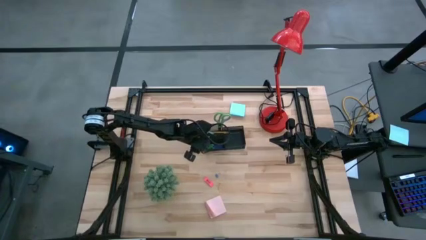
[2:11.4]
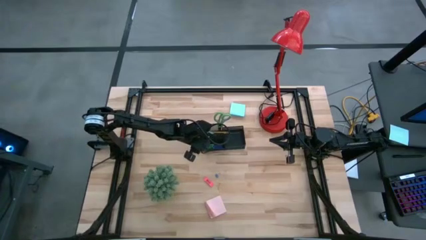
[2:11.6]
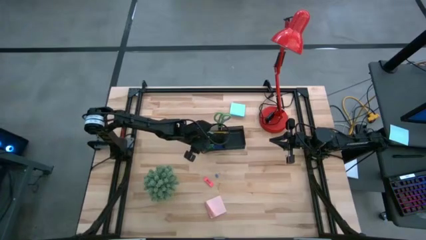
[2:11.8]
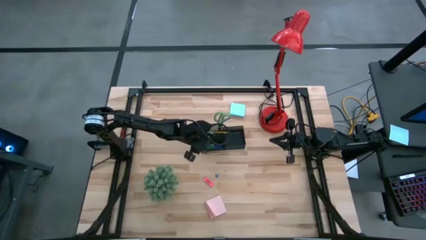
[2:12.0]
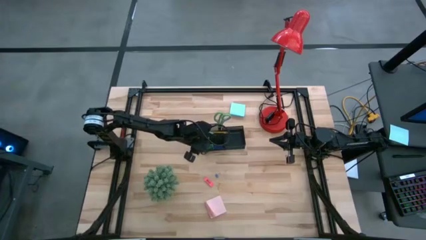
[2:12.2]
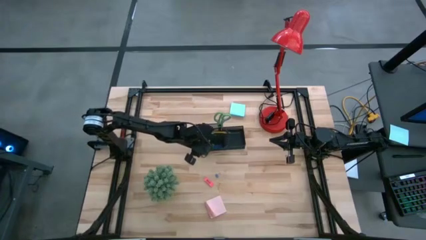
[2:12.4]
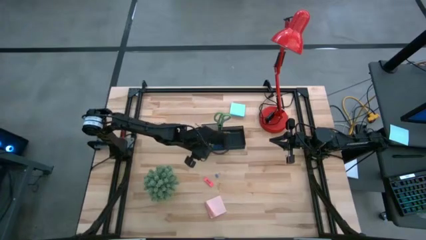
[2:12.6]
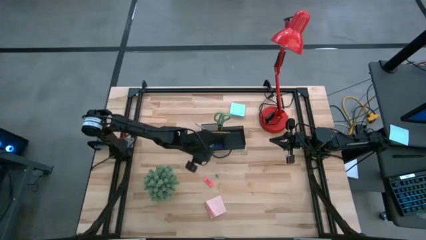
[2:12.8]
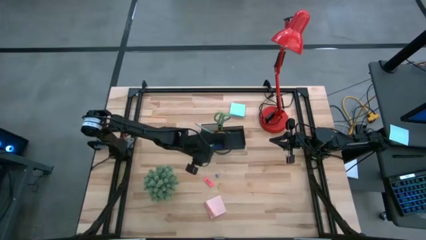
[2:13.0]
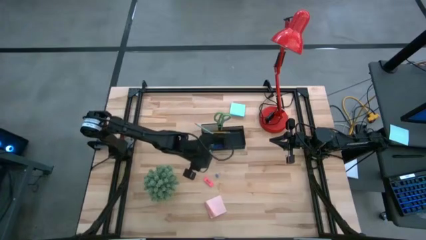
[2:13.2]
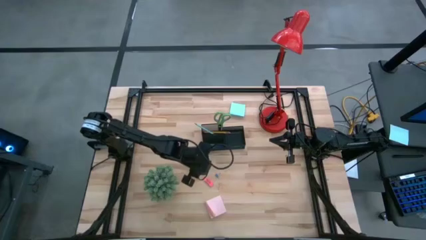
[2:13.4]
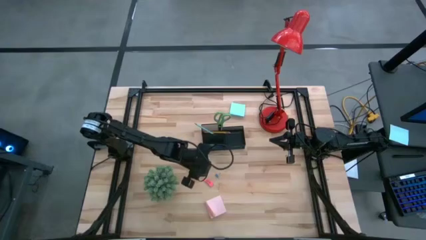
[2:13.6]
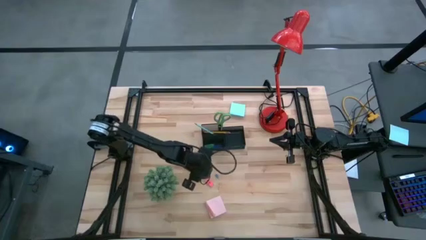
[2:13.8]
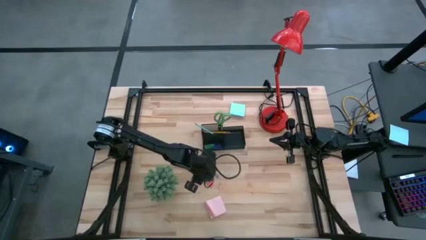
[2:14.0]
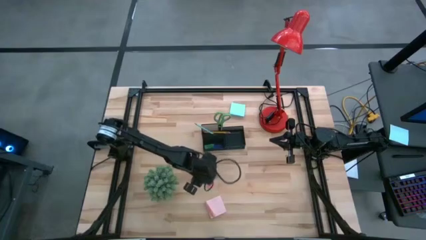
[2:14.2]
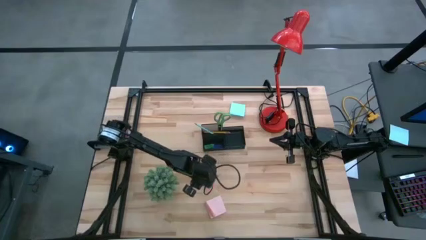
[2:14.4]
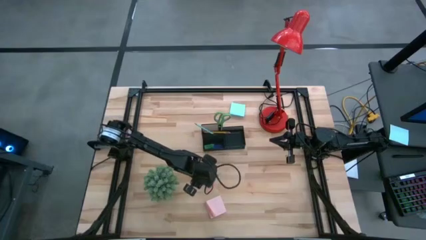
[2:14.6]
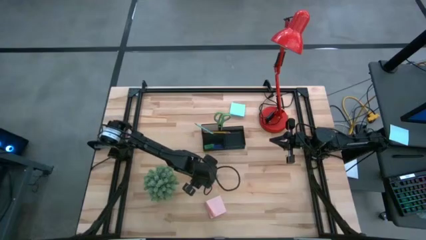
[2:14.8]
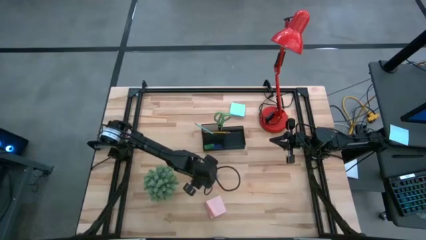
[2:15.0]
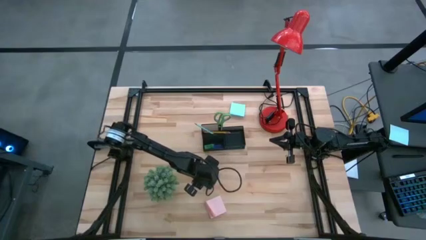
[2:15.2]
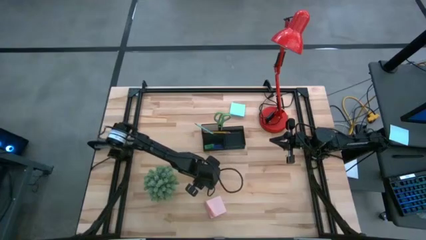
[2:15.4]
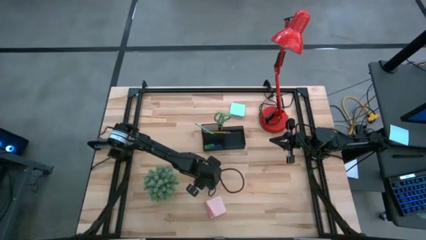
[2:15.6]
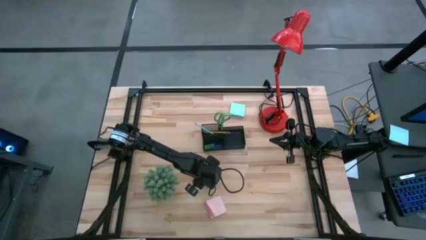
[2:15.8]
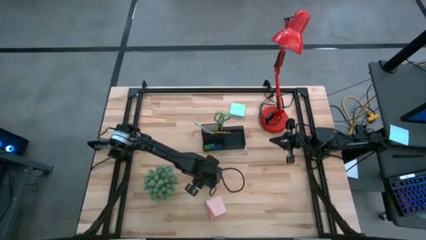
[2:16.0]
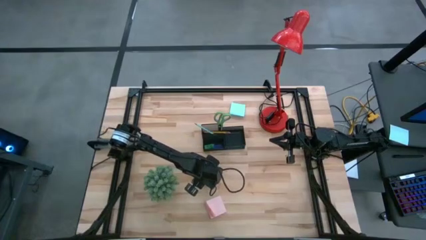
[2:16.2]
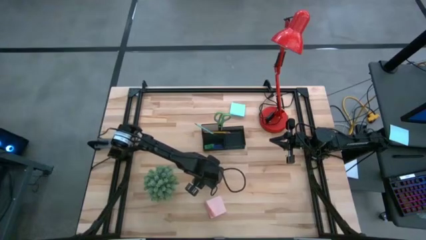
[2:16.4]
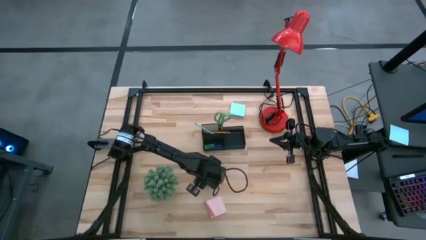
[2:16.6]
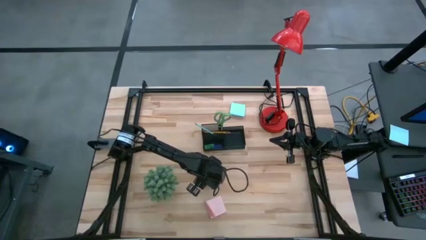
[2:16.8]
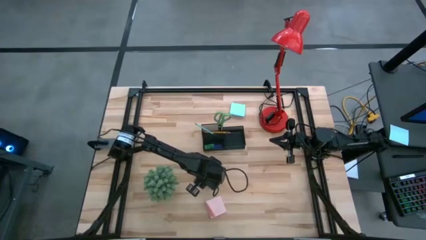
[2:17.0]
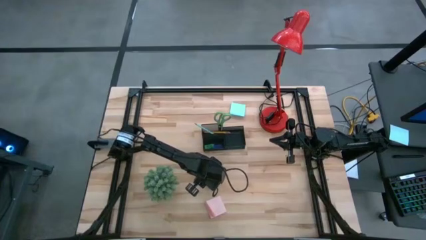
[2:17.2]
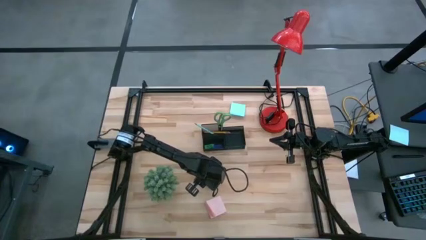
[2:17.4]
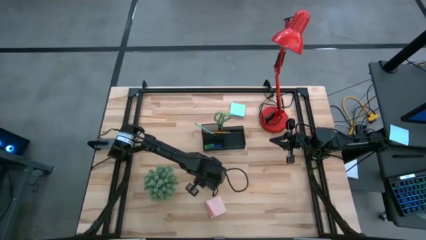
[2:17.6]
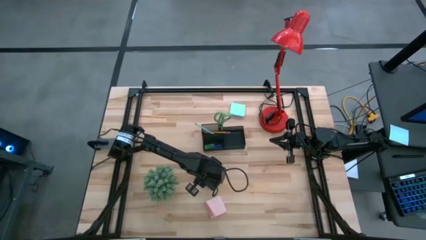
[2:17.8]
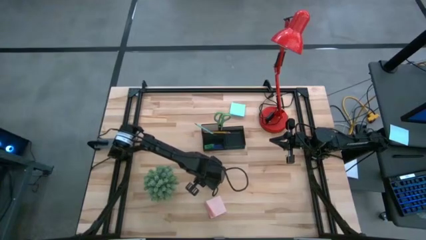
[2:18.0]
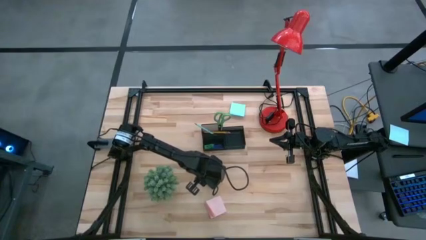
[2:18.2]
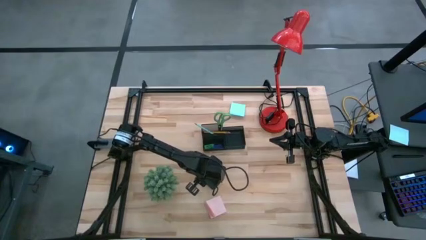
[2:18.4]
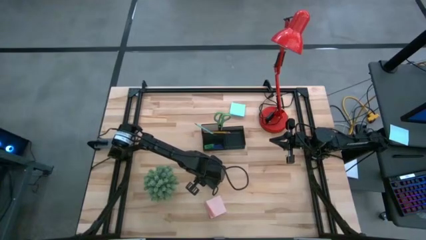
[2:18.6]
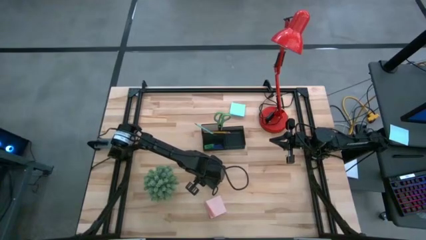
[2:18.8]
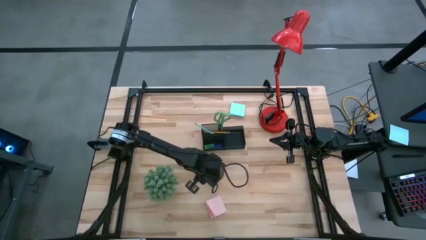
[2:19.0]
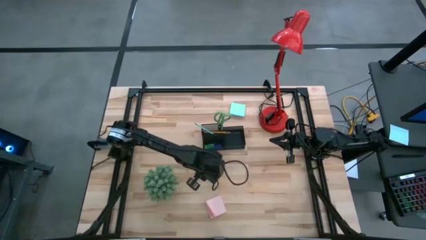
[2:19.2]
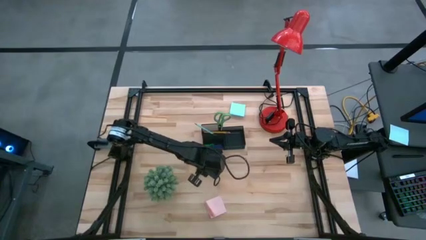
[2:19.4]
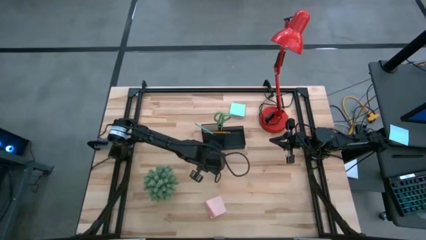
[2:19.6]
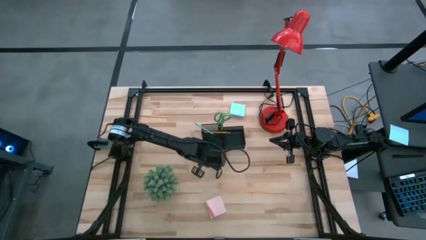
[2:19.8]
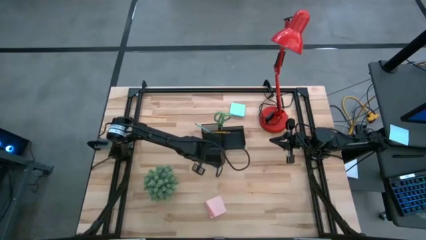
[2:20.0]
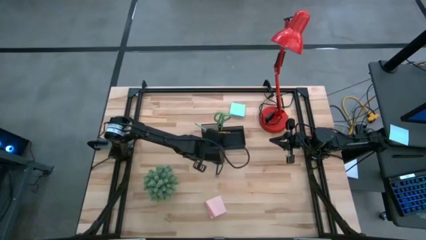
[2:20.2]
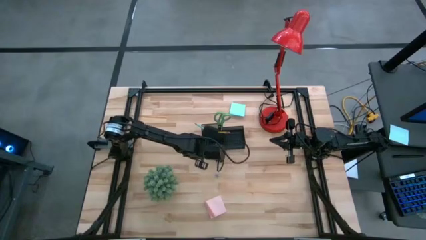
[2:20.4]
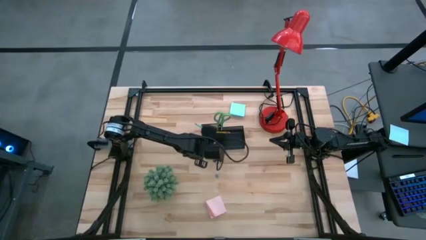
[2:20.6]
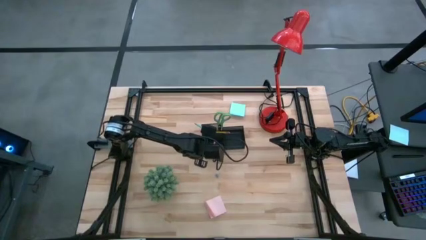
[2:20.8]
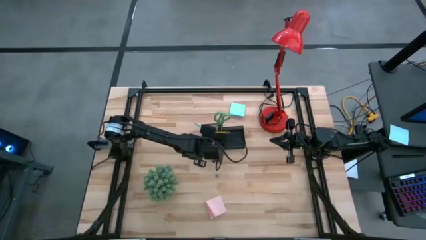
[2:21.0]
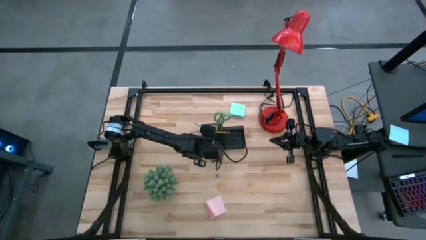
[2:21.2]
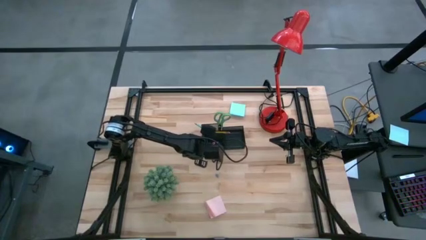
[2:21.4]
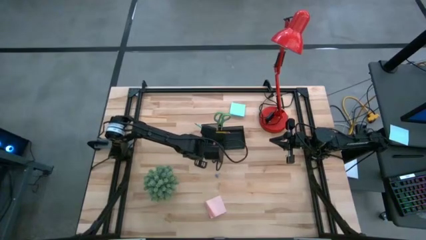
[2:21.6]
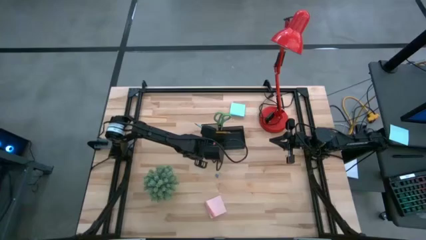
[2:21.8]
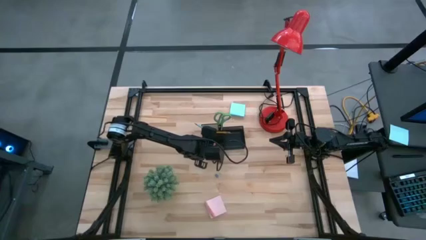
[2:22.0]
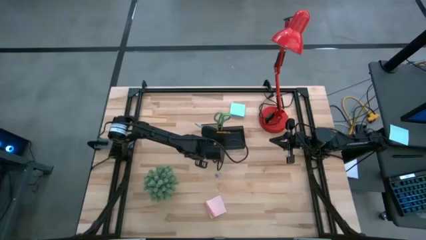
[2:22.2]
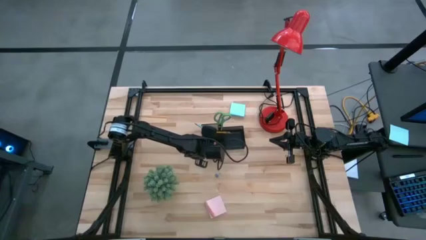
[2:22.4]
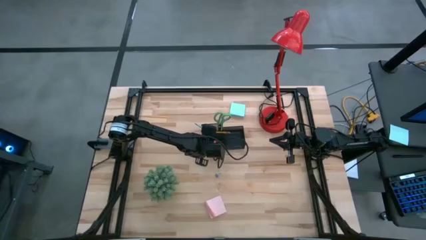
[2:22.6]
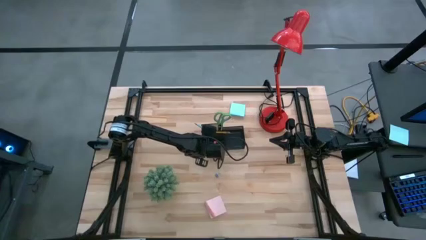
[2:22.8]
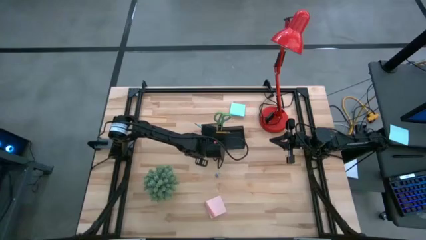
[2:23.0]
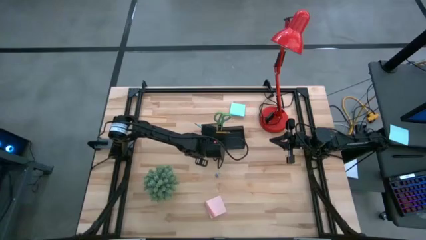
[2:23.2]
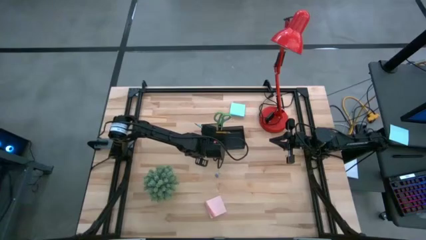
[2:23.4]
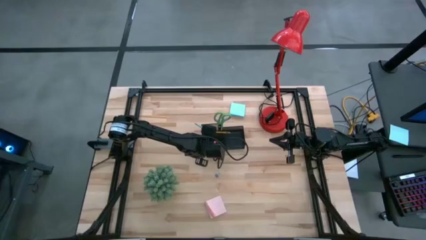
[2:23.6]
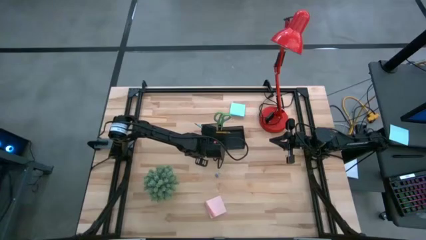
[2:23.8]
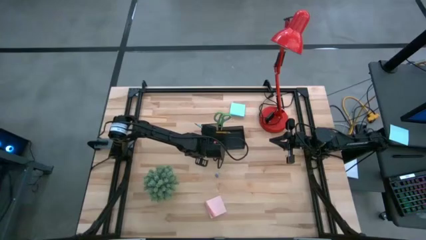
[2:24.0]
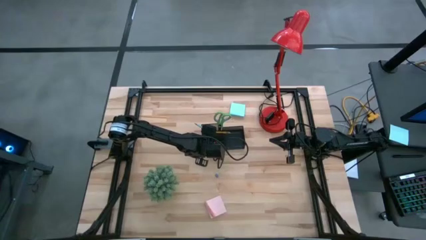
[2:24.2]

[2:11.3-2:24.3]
Task: Pick and place office supplies into organizer
Put the pink eraser into the black desk organizer

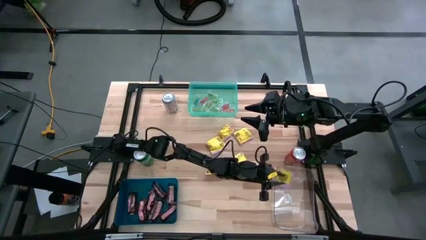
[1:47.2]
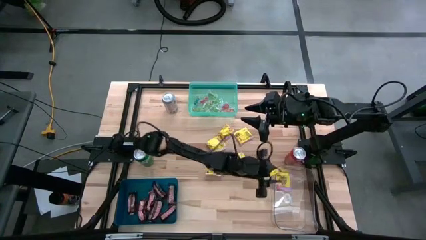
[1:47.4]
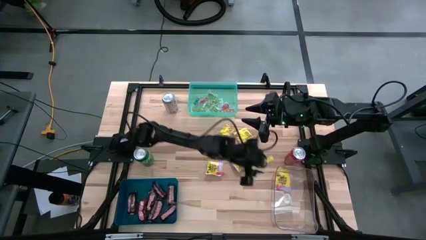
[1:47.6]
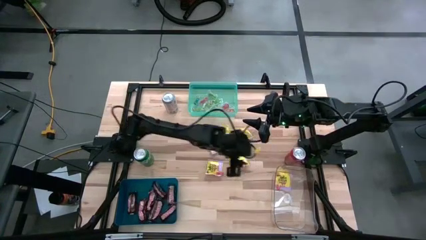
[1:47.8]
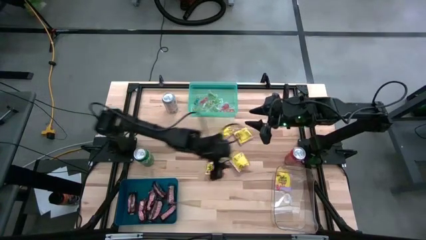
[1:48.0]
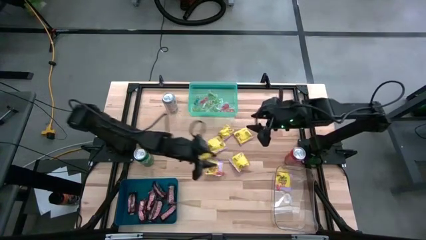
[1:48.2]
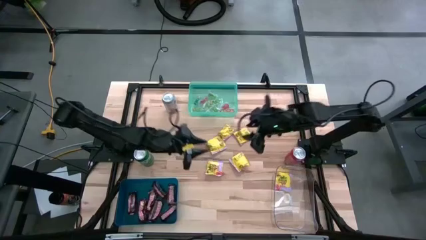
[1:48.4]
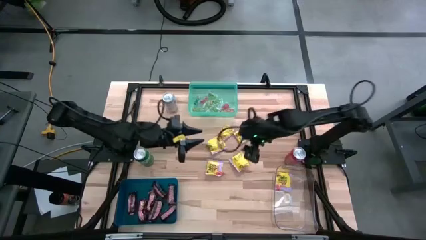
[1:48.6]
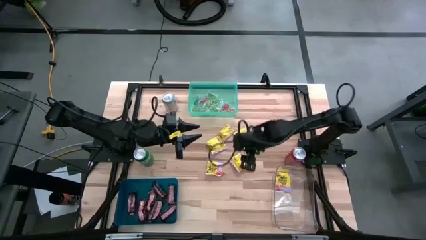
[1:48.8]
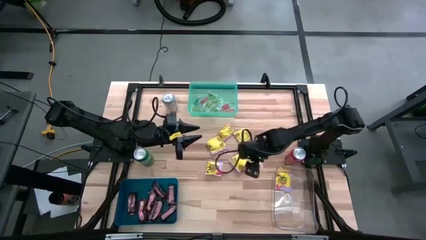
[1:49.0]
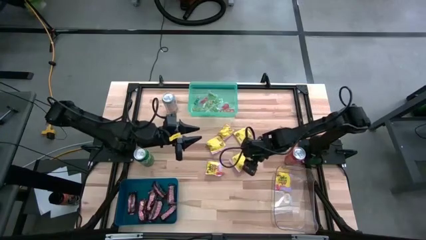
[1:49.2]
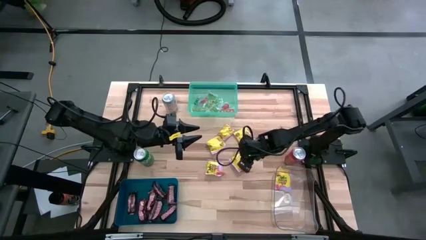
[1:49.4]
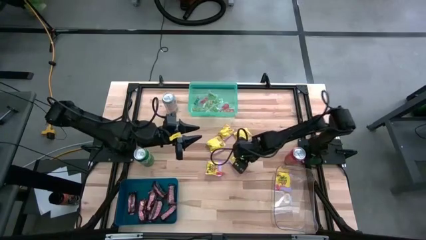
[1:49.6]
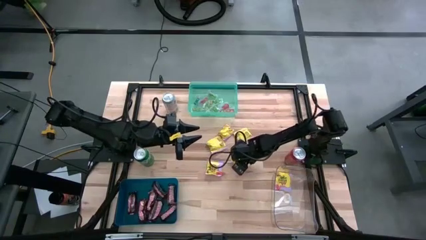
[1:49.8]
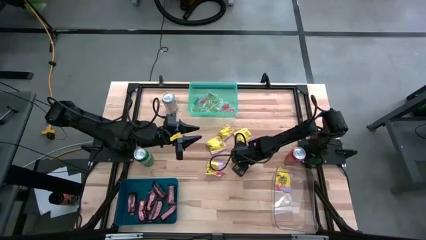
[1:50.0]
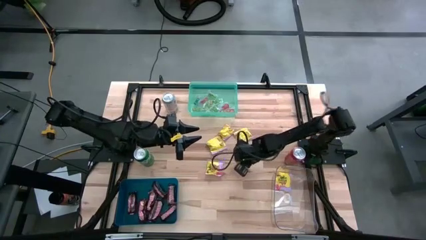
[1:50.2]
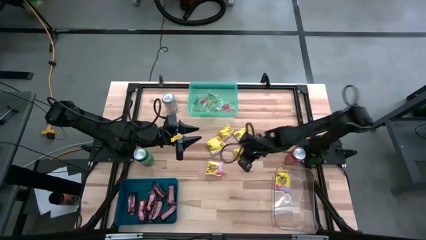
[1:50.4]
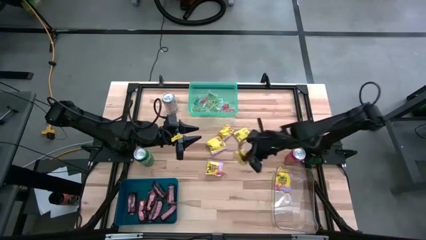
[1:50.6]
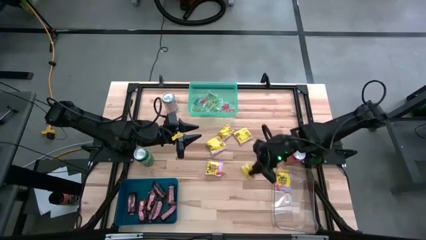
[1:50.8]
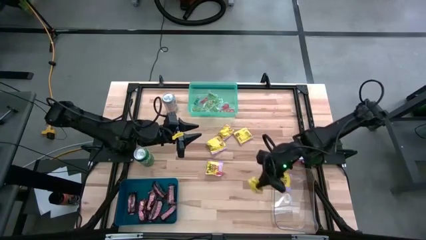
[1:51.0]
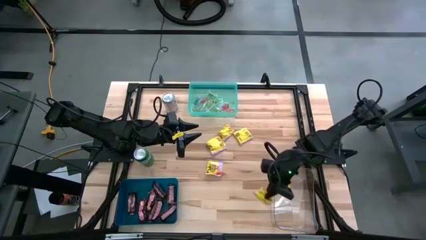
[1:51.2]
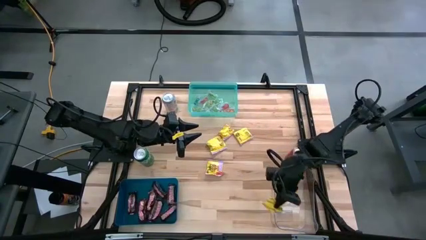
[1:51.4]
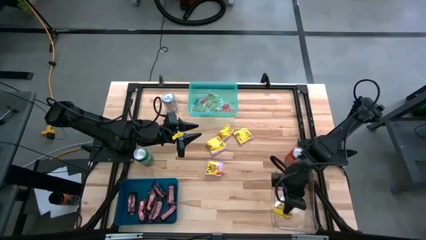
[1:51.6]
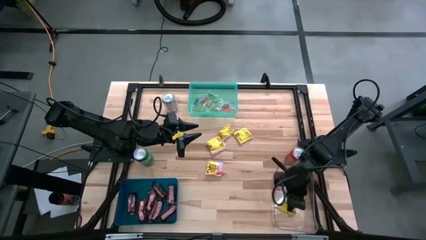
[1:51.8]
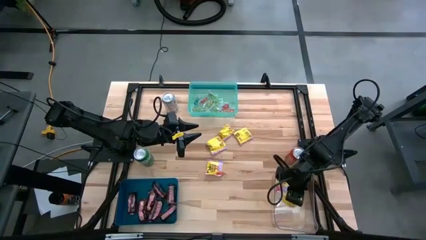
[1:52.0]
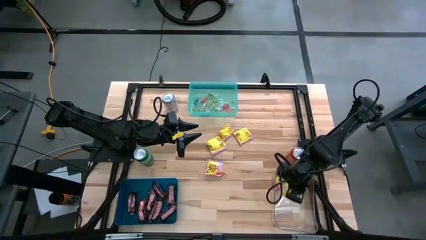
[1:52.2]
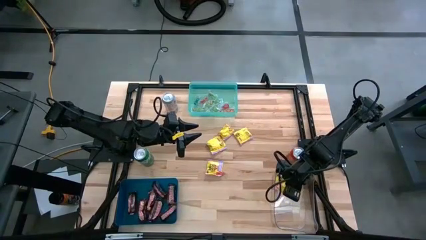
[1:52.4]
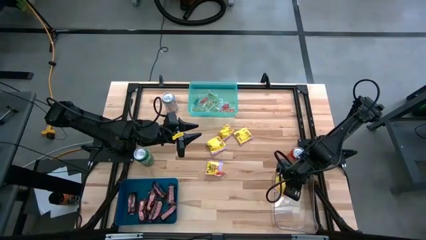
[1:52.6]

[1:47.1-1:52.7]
Task: Sort candy
Put the yellow candy into the transparent bin
